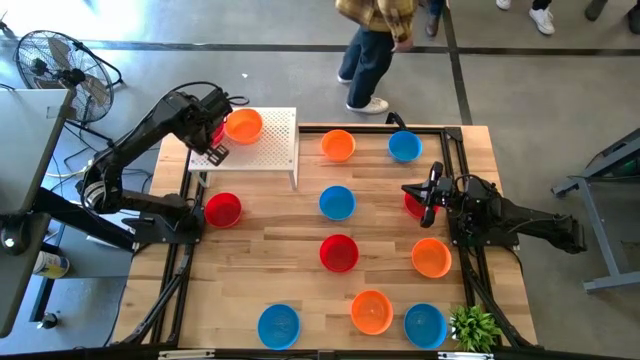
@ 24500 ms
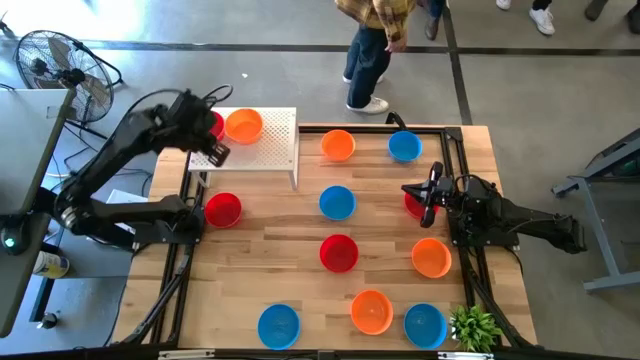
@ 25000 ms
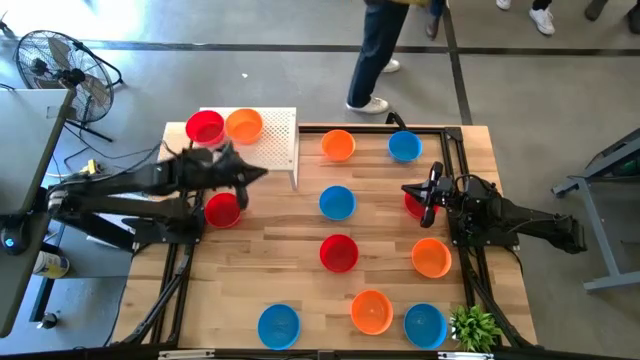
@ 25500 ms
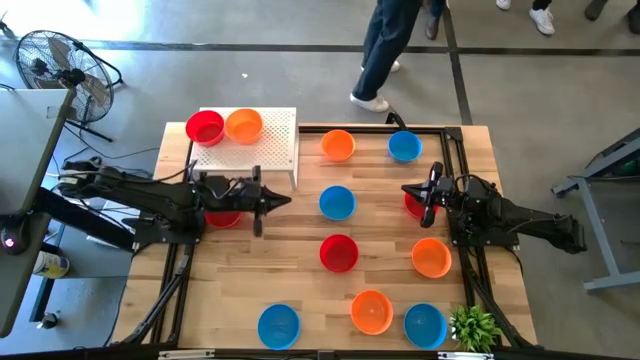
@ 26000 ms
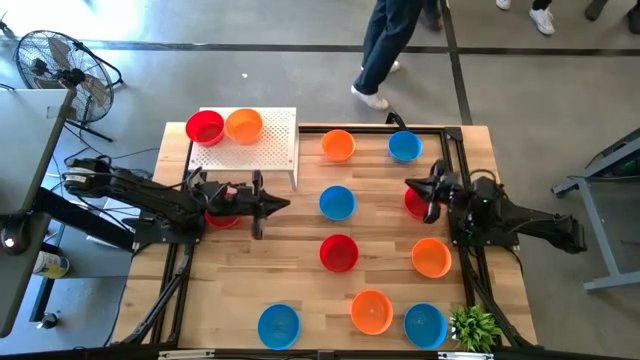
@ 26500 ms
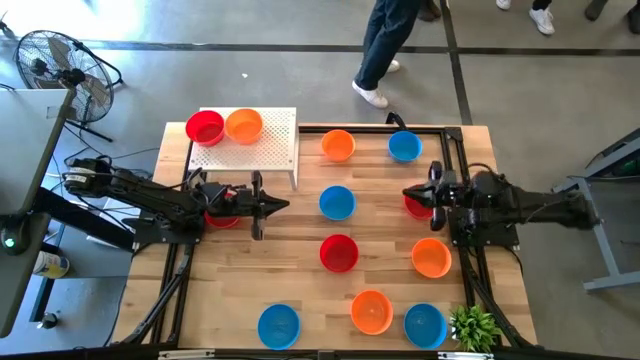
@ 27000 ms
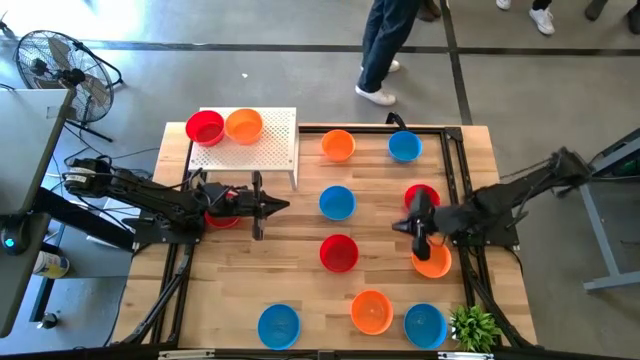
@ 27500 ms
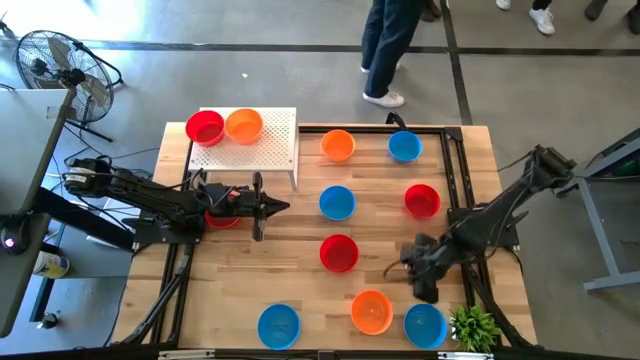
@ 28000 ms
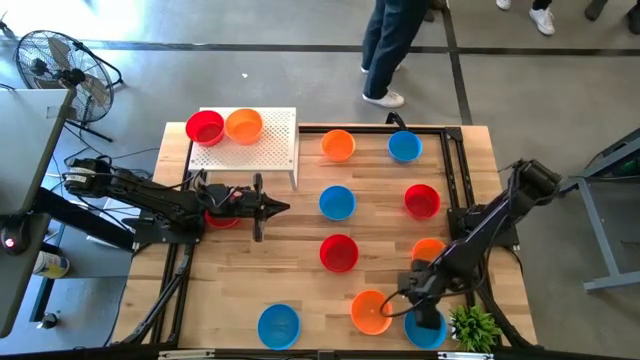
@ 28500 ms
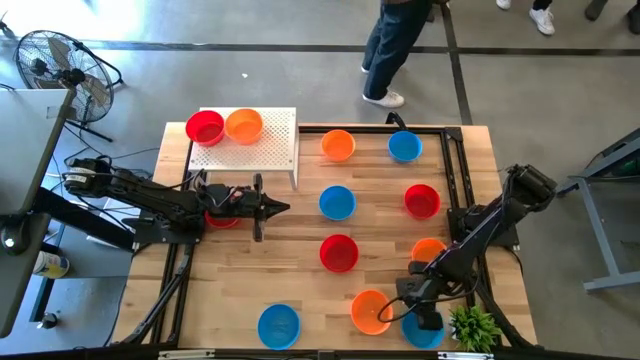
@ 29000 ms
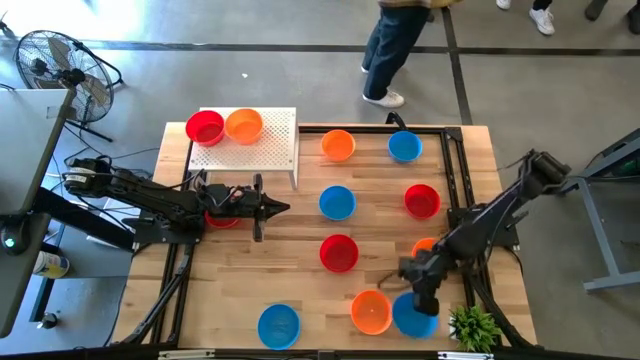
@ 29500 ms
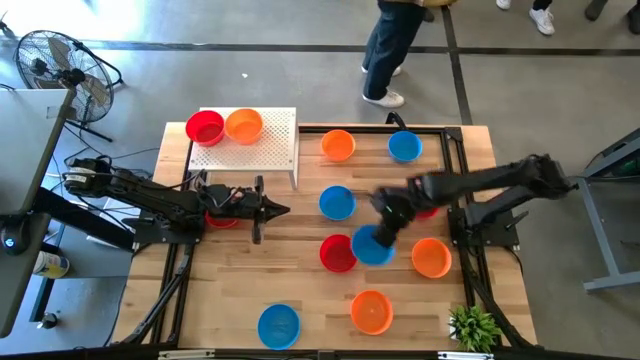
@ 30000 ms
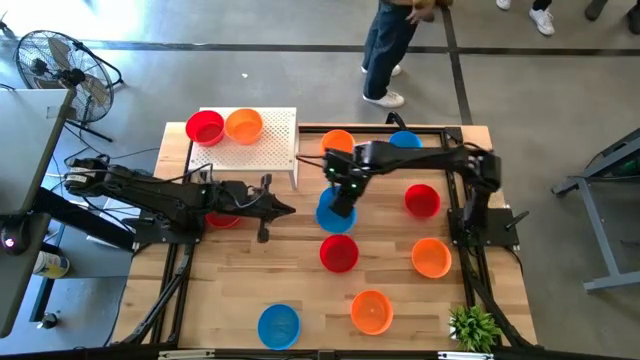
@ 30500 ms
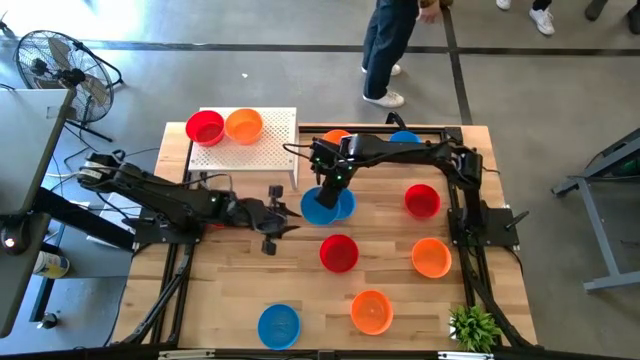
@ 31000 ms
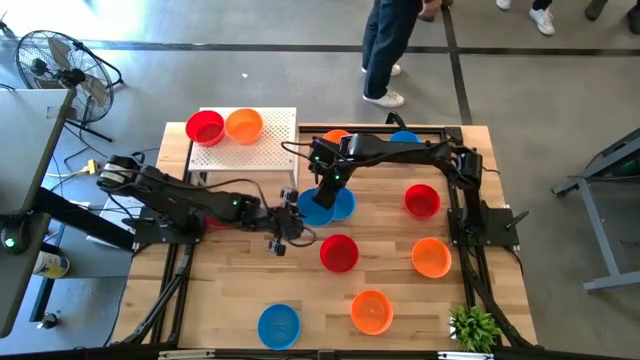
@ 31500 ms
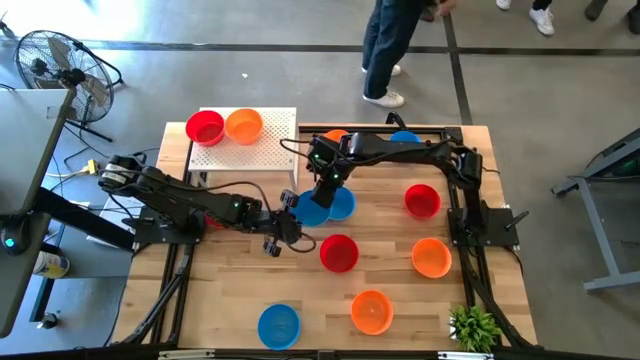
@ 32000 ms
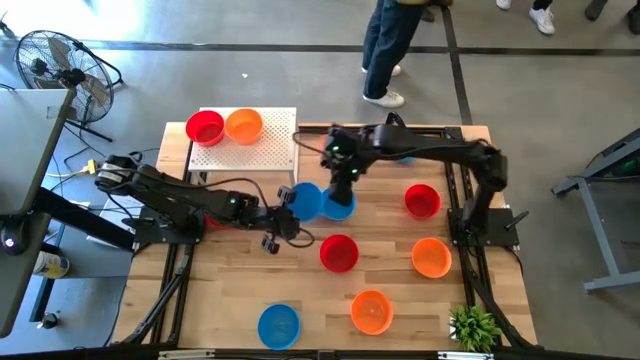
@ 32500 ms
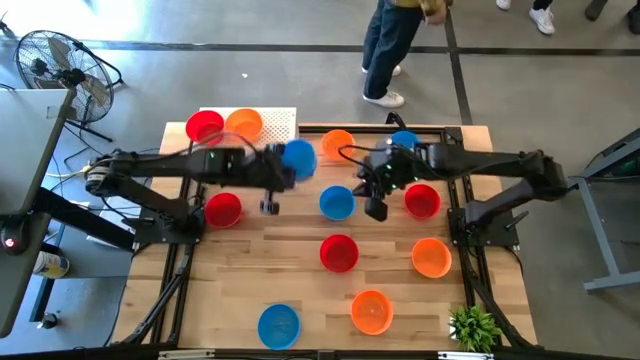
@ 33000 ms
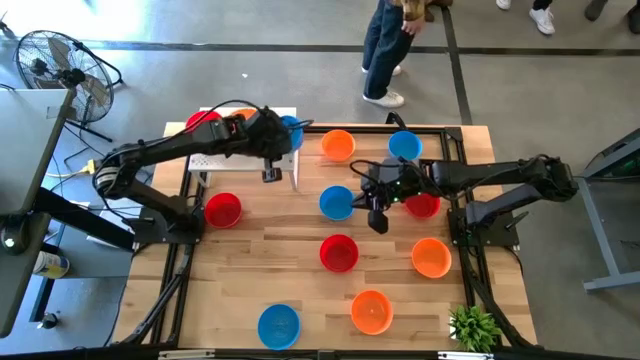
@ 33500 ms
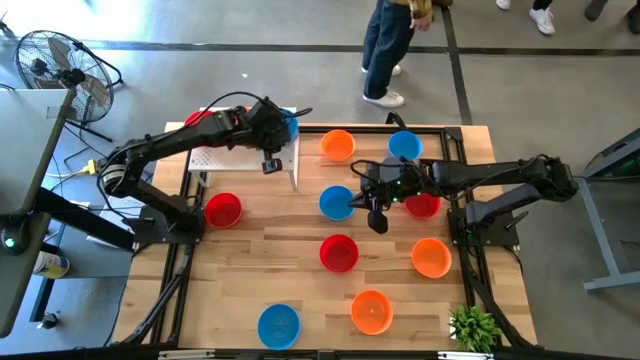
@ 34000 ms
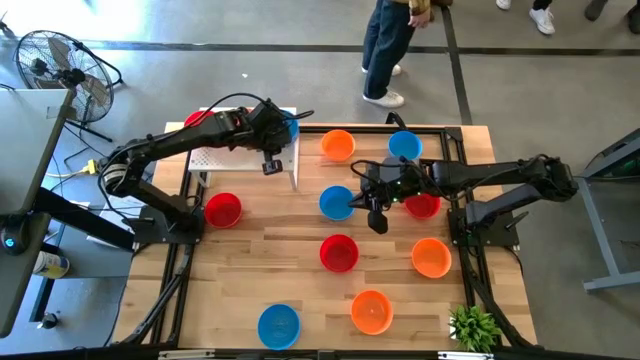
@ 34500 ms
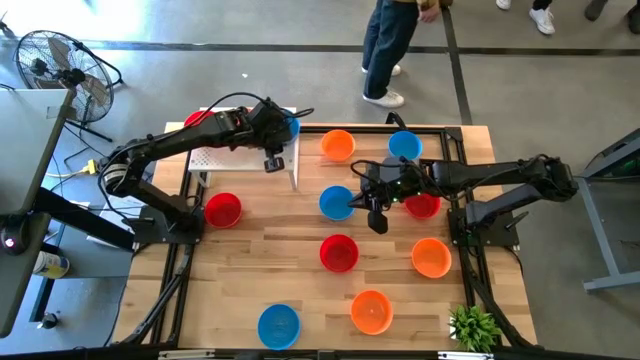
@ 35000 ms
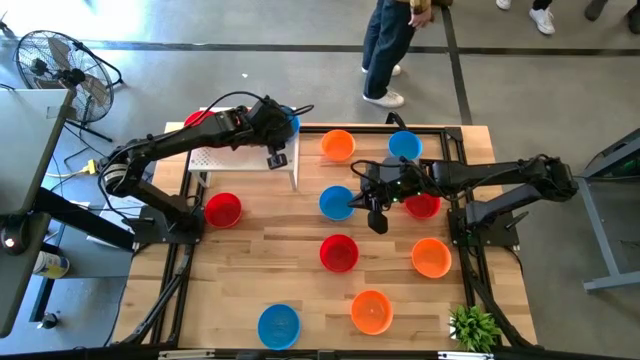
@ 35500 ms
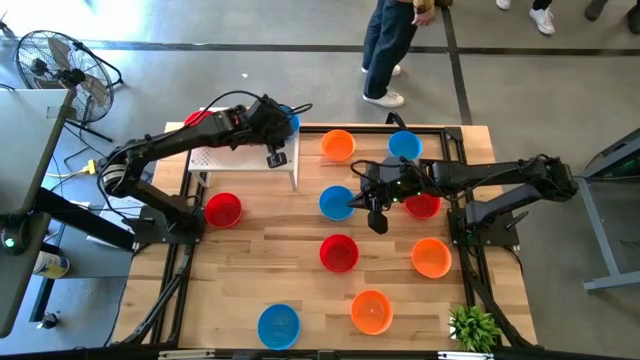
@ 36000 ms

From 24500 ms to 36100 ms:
Task: Pick & Place Mini bowls
Put the blue bowl on the shelf

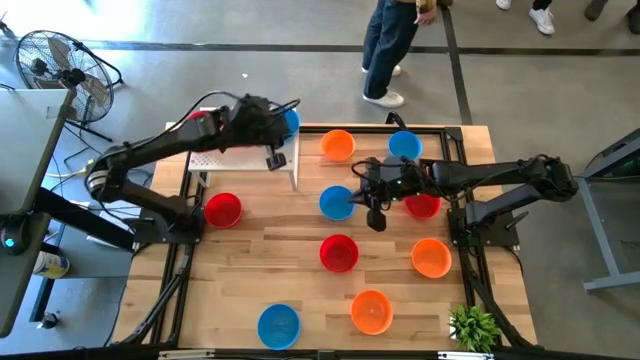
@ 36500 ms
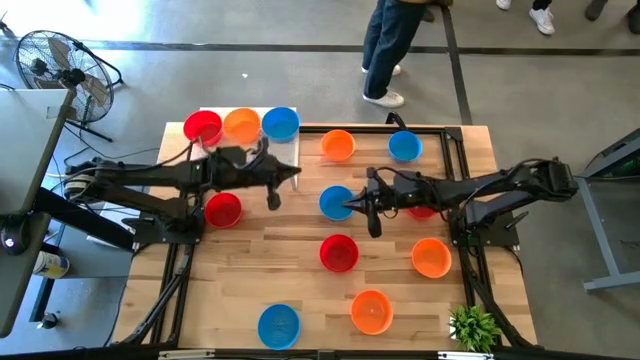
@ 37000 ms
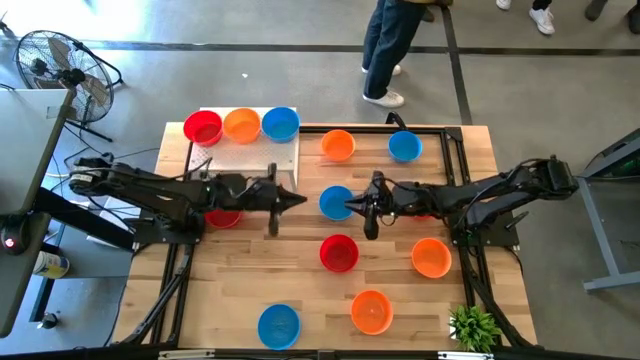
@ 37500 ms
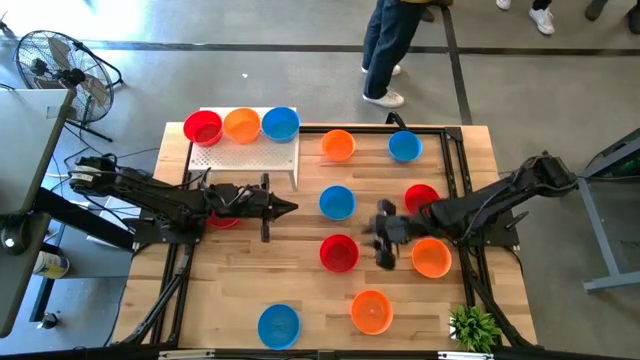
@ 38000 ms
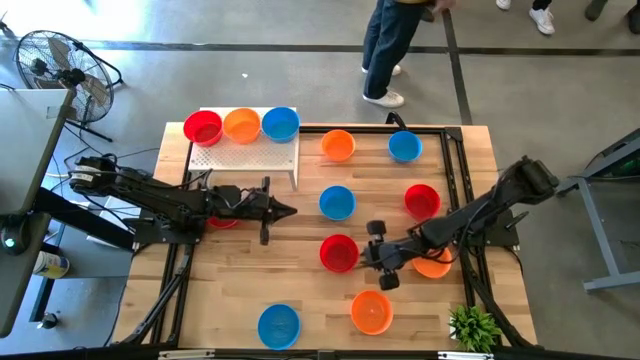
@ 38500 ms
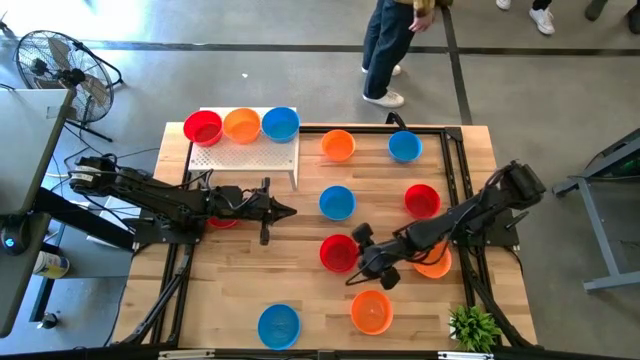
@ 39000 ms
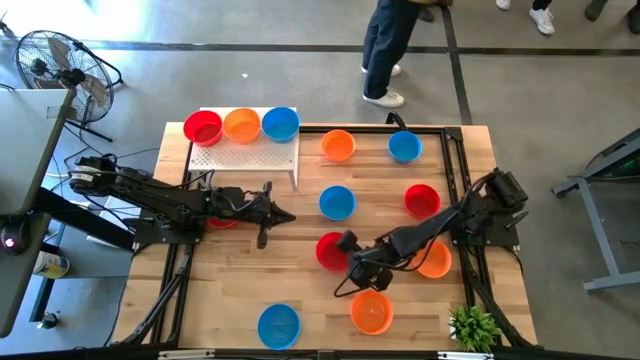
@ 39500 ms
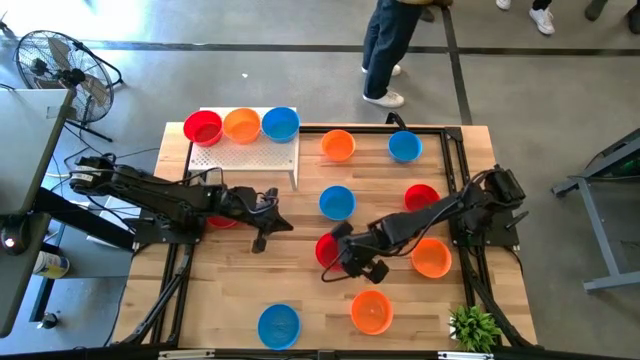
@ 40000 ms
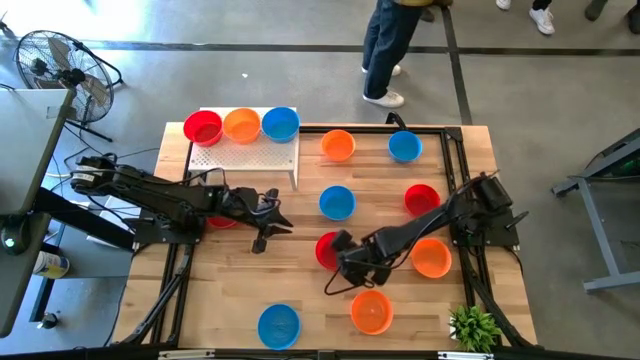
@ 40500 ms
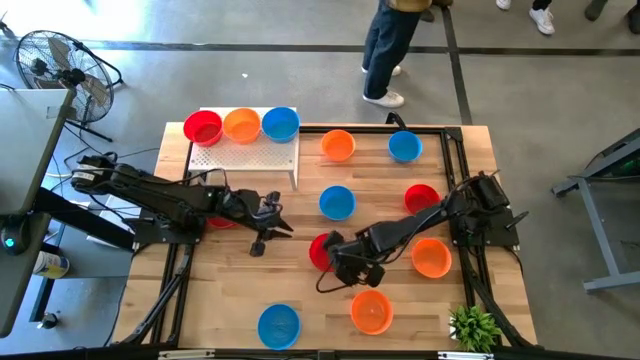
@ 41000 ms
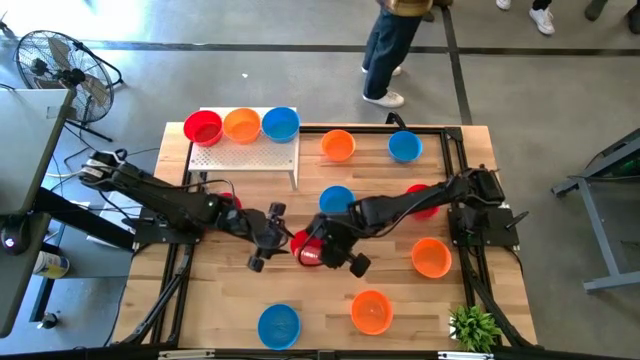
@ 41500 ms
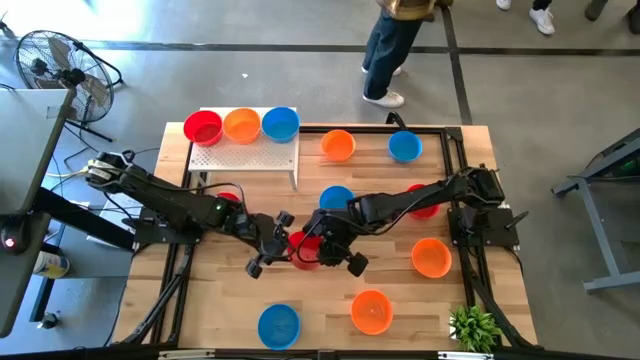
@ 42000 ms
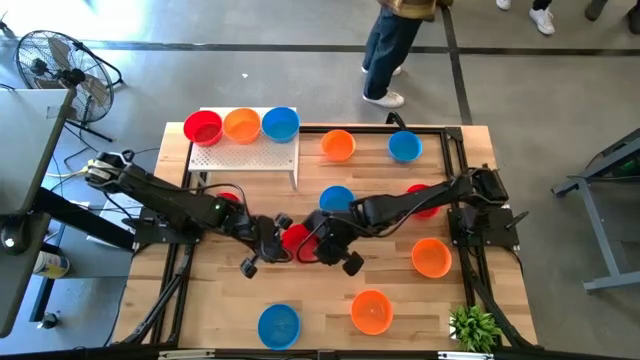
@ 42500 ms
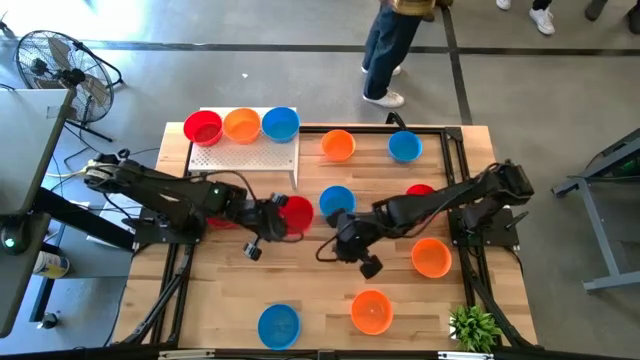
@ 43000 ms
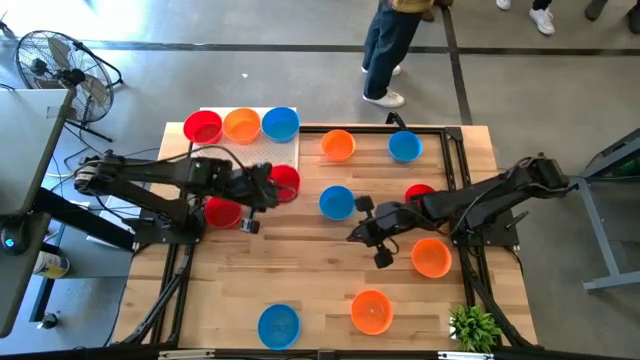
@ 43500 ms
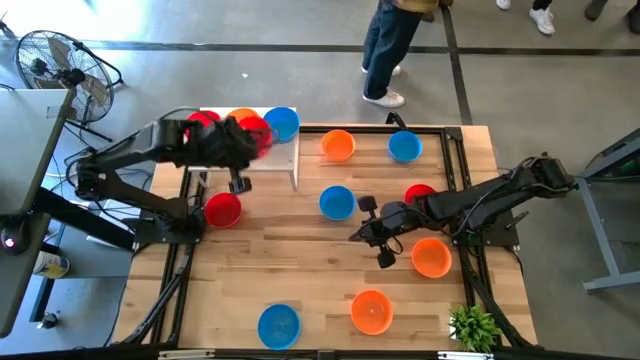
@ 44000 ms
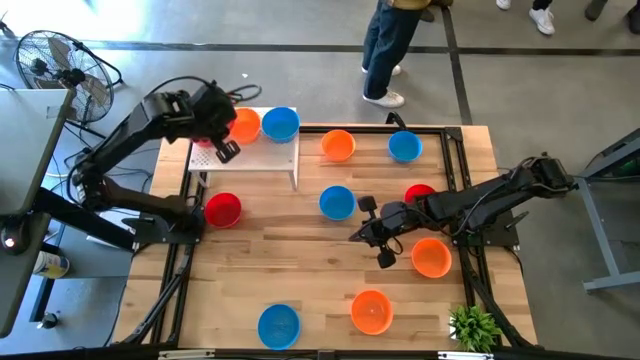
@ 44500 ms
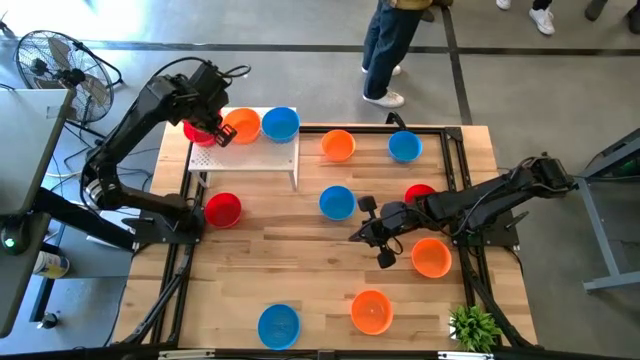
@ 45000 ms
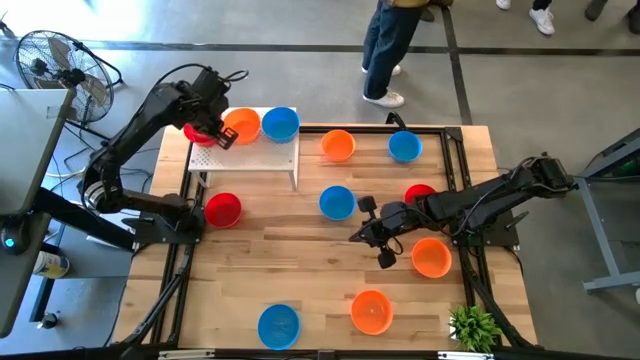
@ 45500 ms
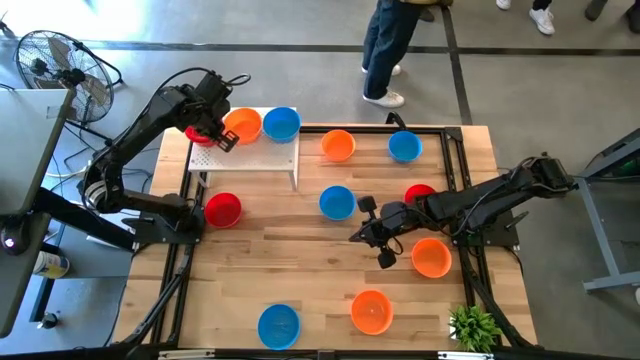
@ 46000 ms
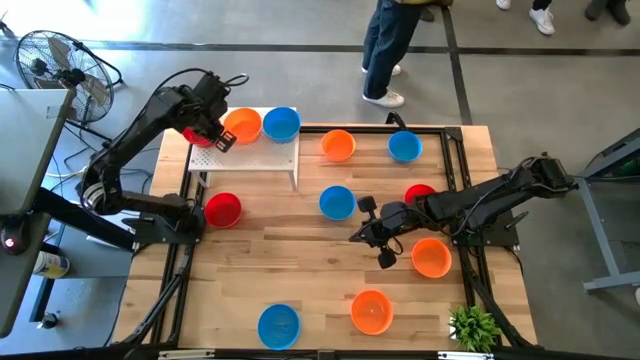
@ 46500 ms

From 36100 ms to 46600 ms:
Stack the red bowl on top of the other red bowl on the shelf
